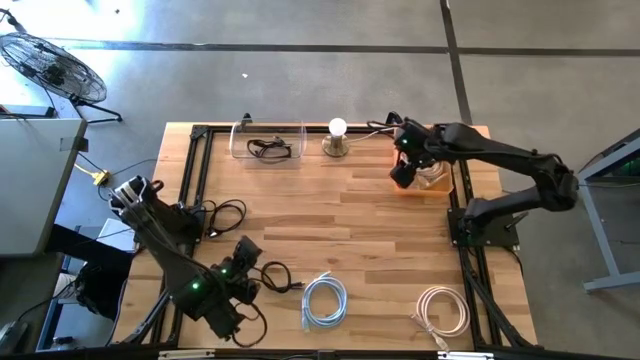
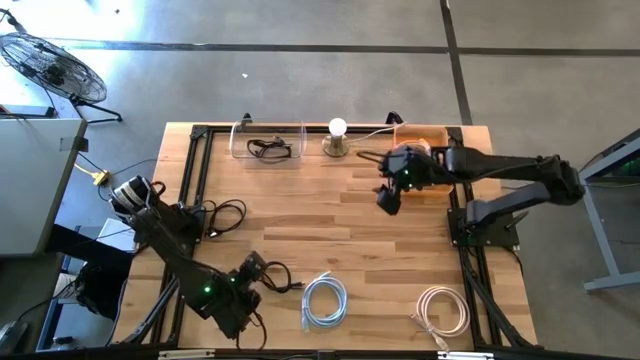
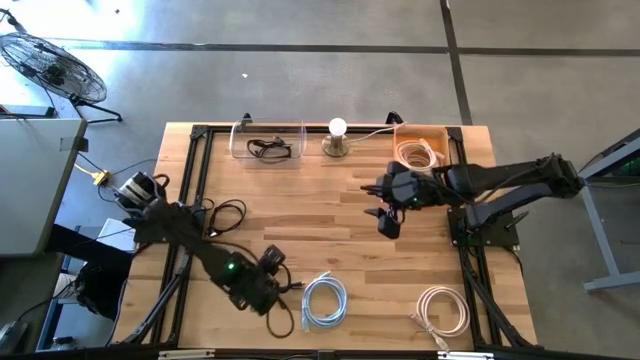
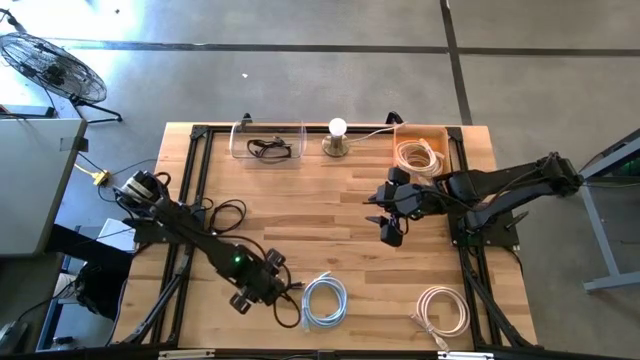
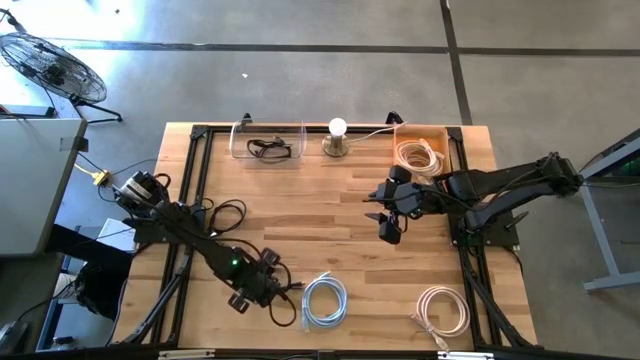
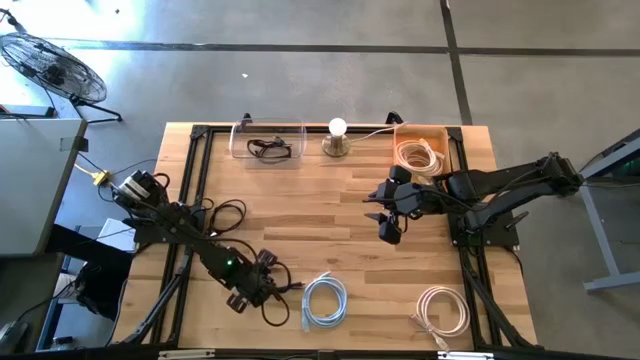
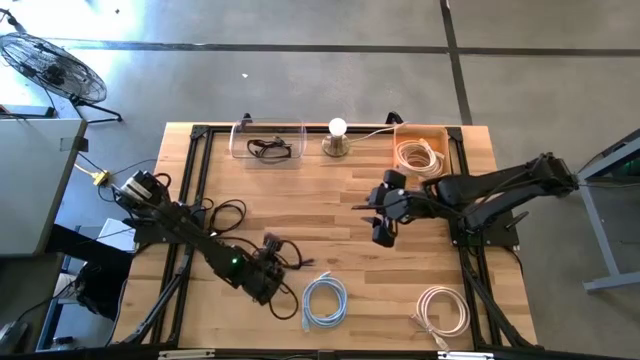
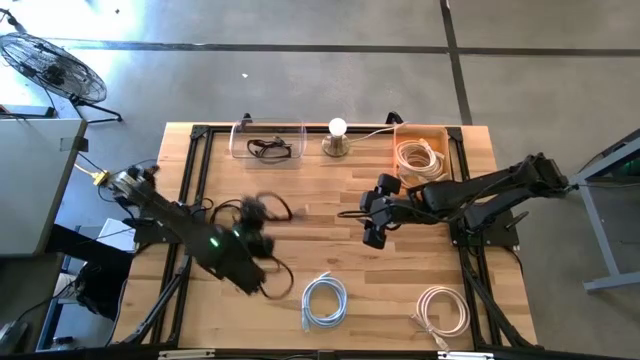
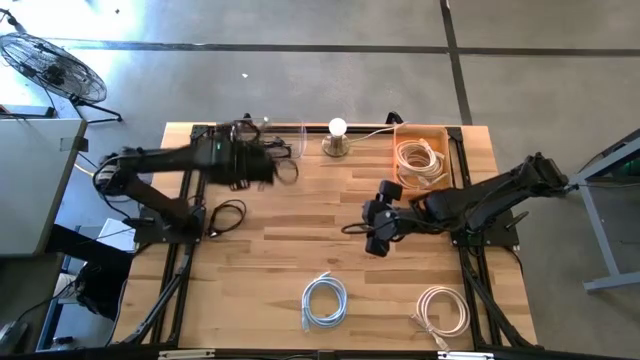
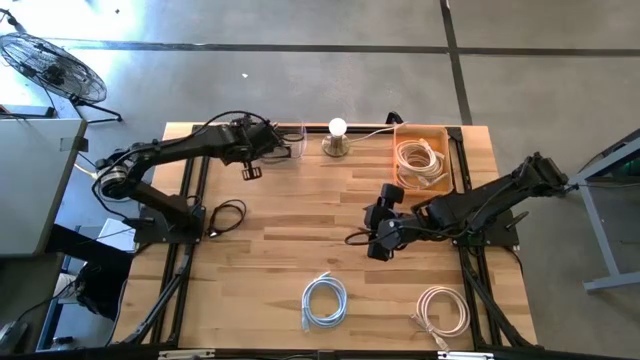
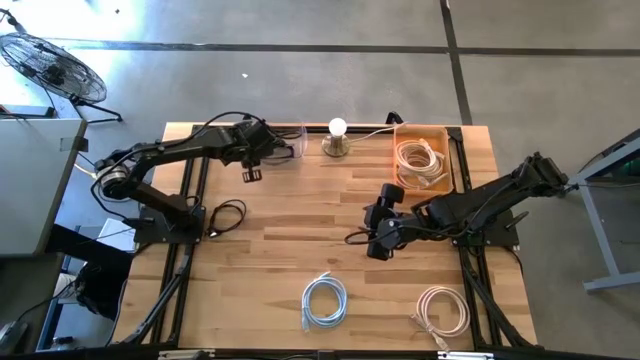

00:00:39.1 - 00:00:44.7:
Task: Pick & Place USB Port
Put the black USB cable into the transparent bin

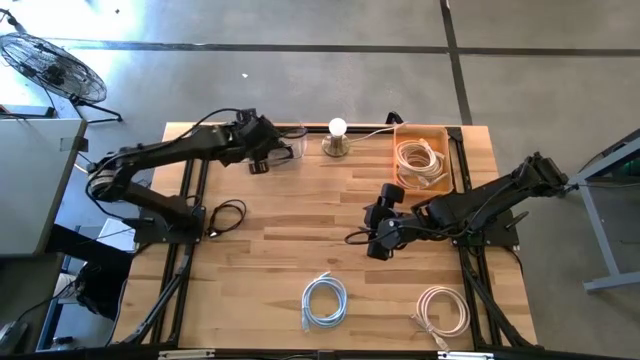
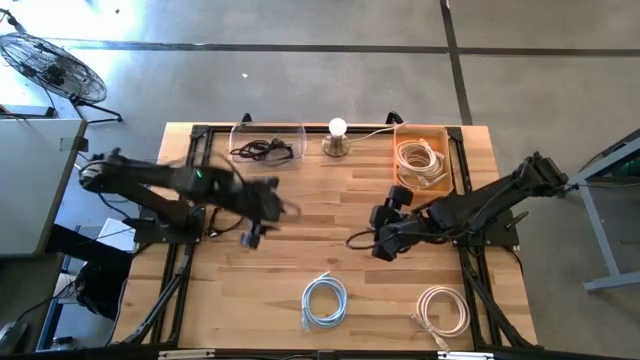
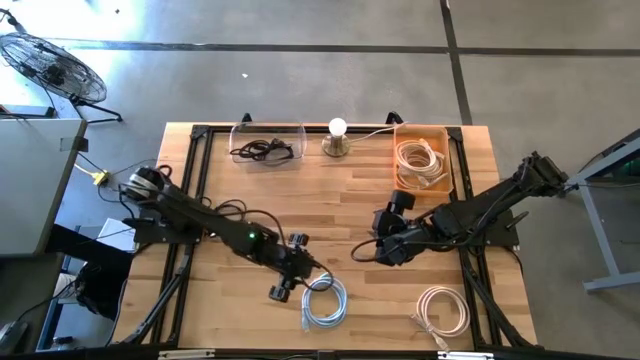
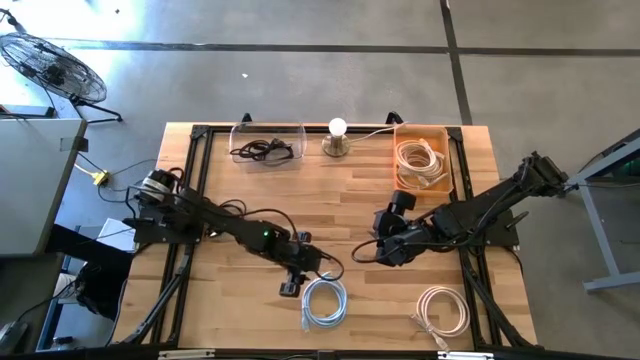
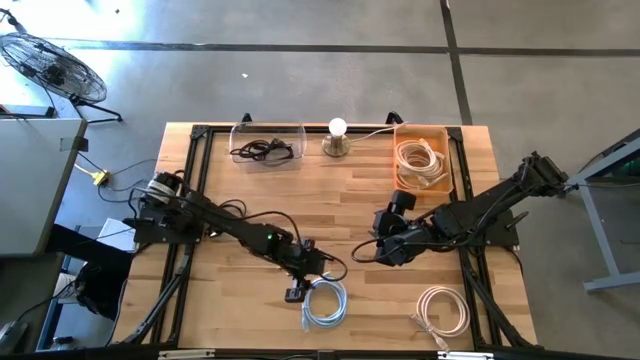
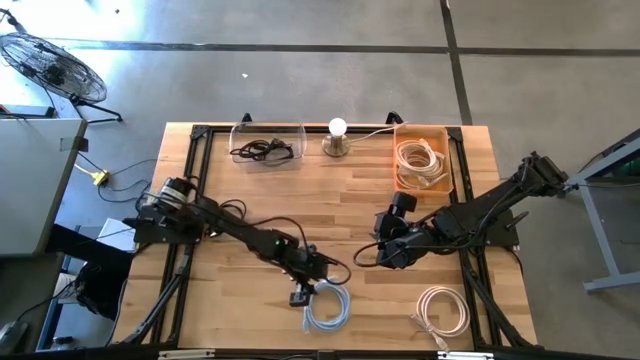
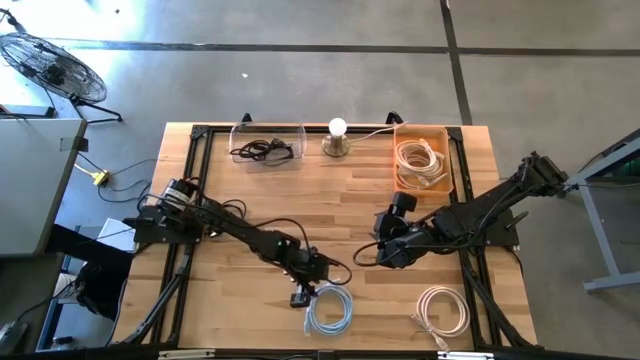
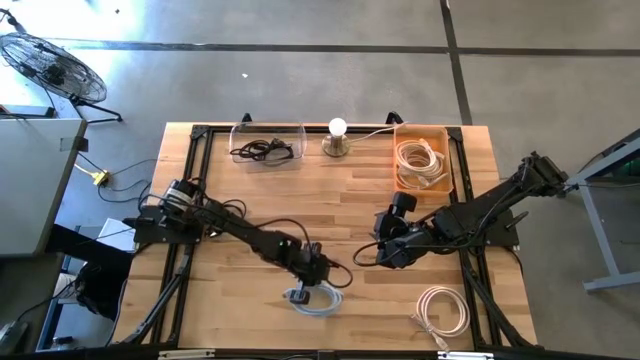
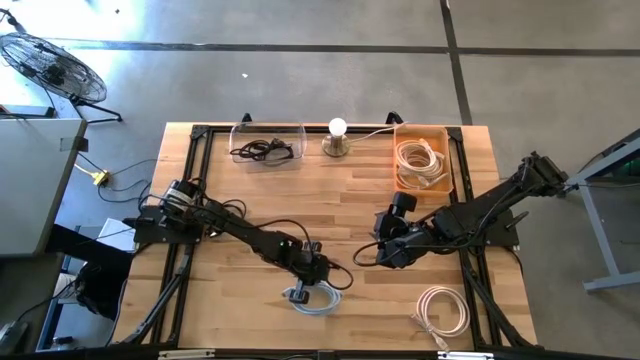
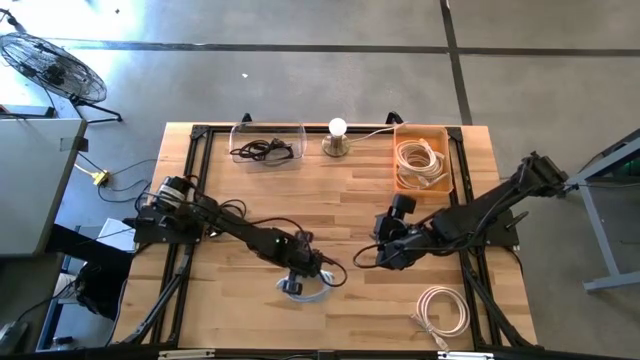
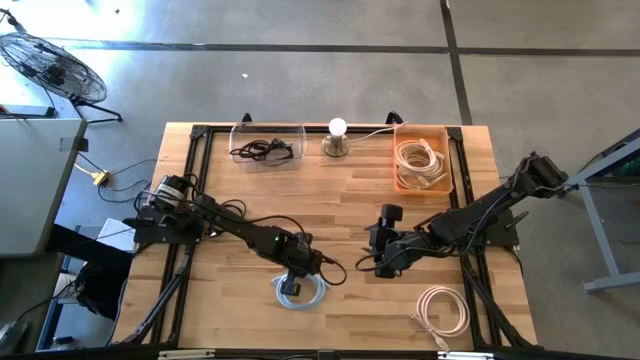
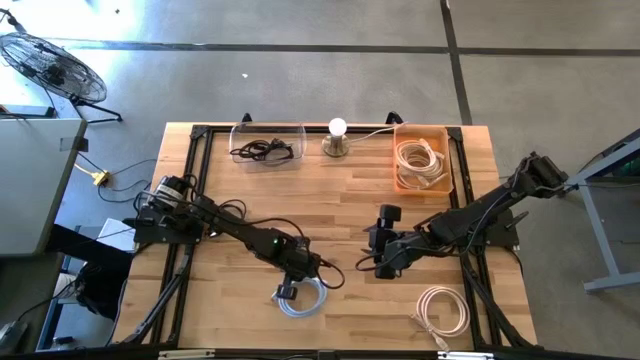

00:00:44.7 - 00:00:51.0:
Put the blue HDMI cable into the orange bin

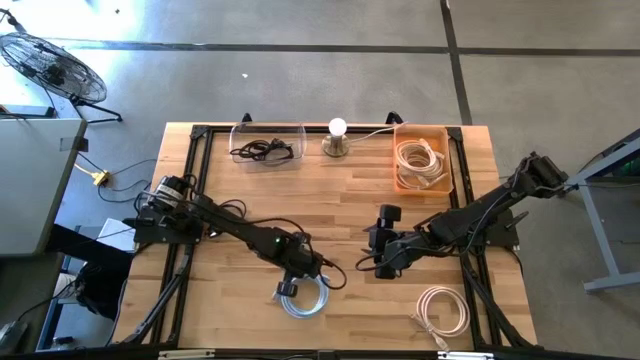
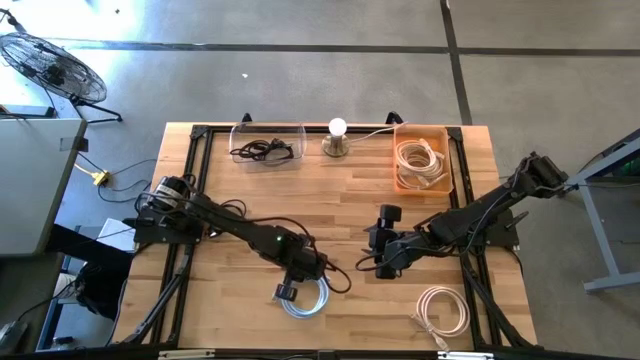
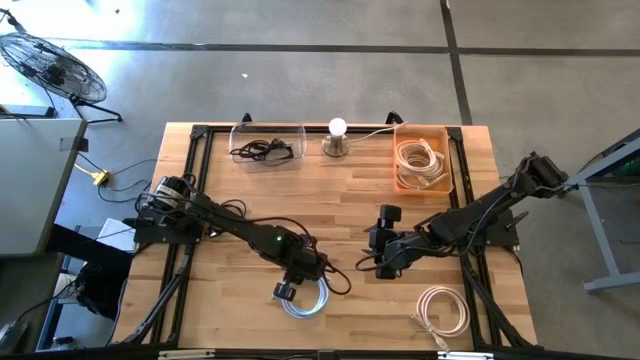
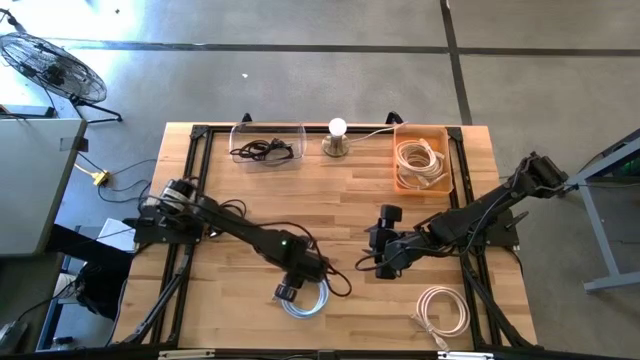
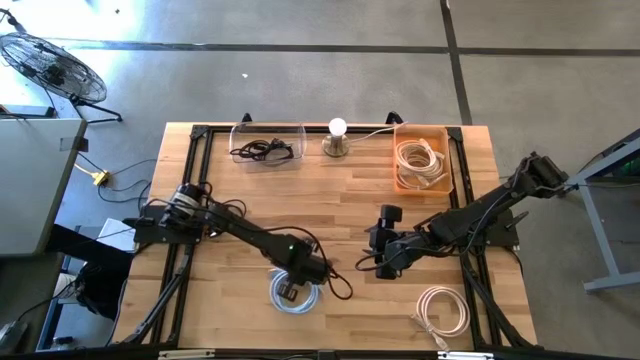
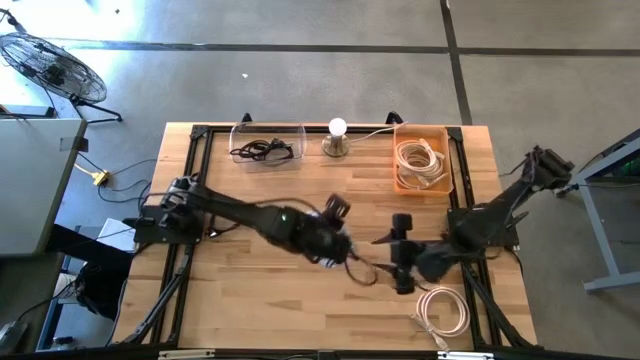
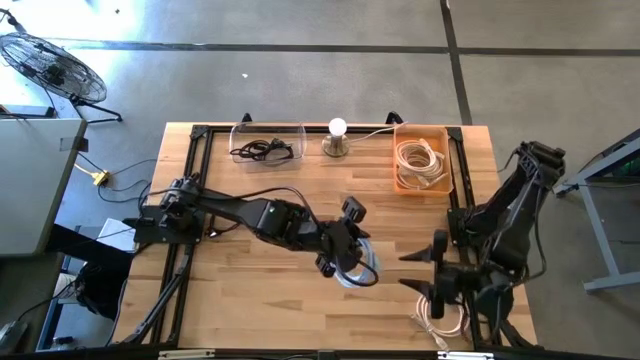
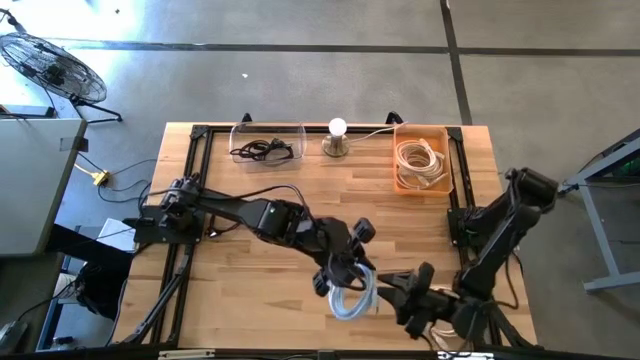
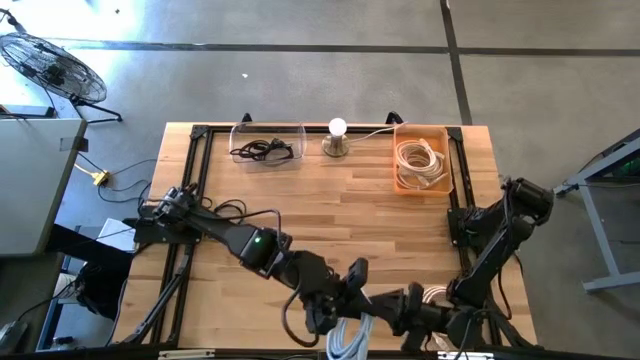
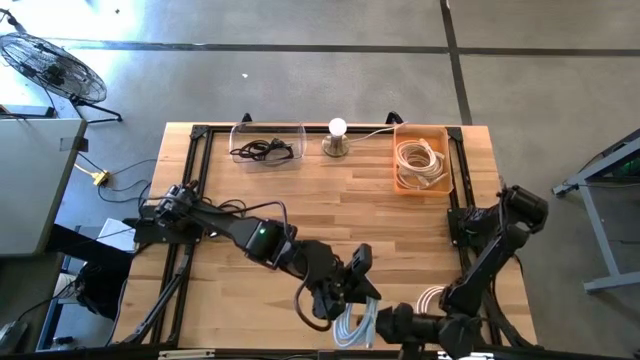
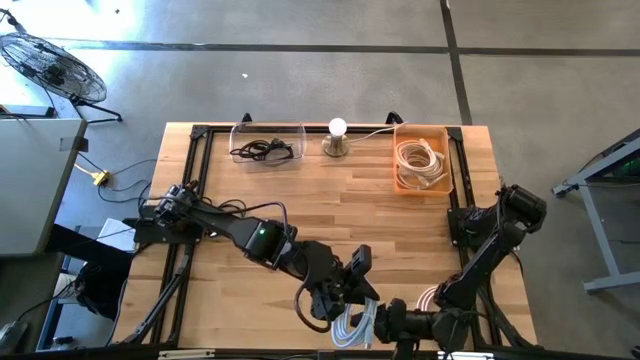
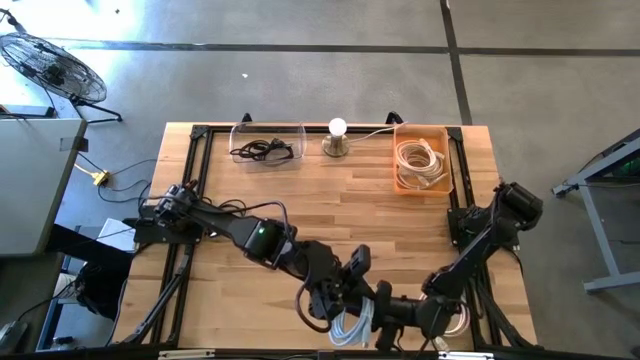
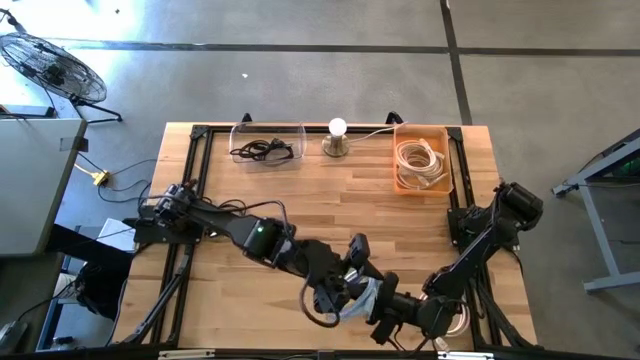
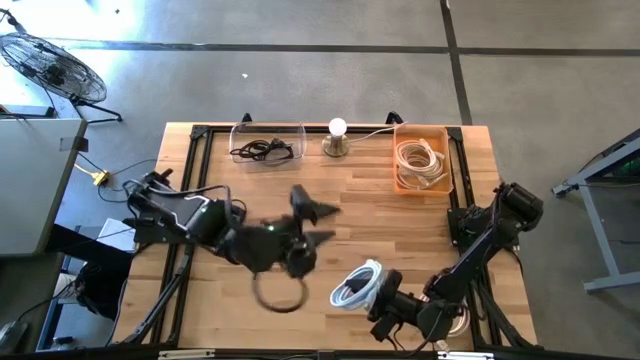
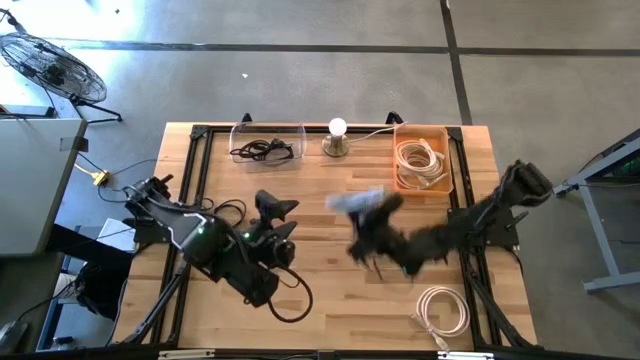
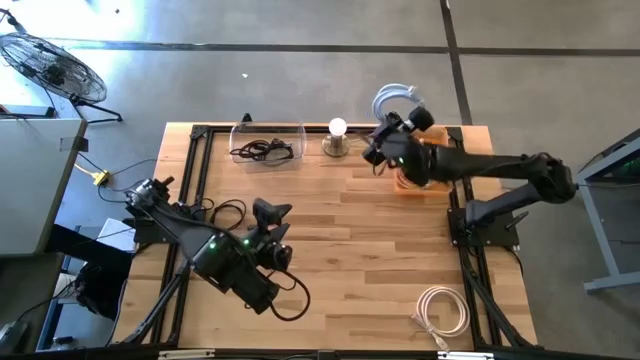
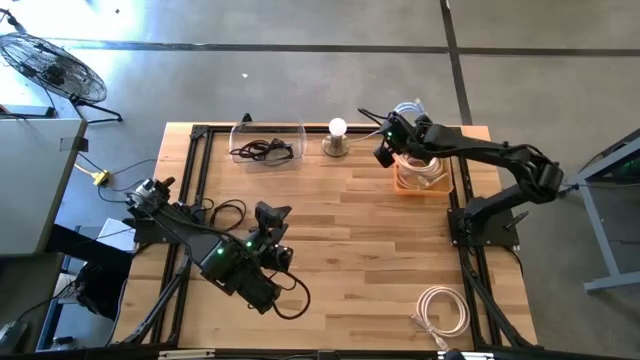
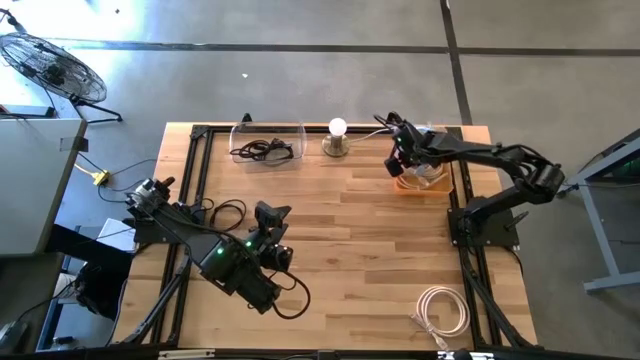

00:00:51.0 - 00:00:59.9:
Put the blue HDMI cable into the orange bin
